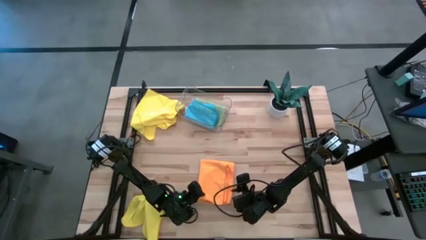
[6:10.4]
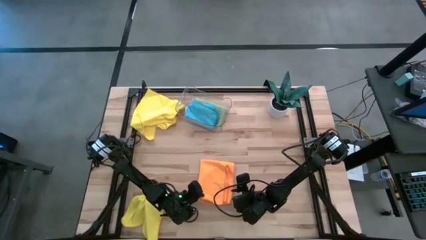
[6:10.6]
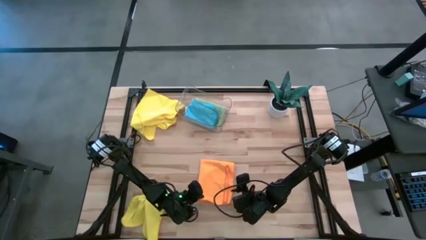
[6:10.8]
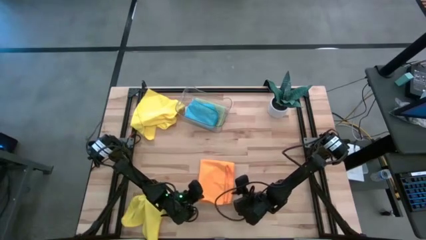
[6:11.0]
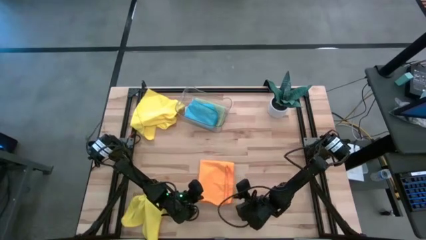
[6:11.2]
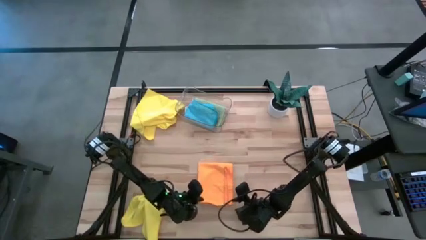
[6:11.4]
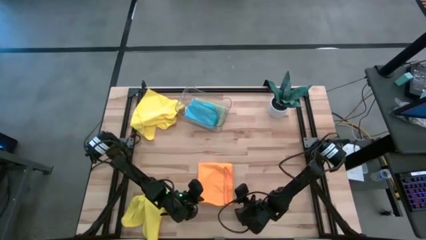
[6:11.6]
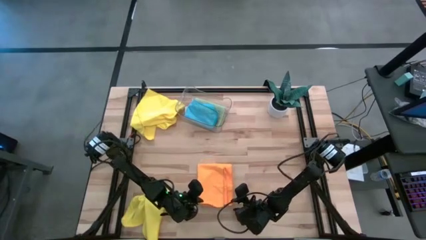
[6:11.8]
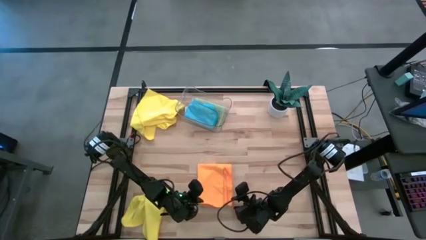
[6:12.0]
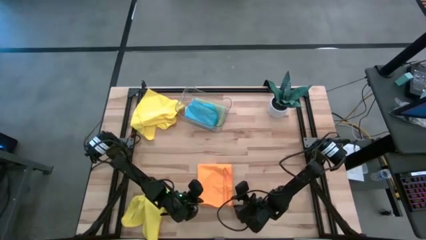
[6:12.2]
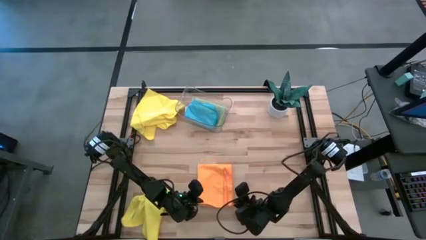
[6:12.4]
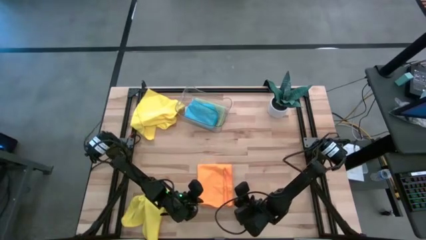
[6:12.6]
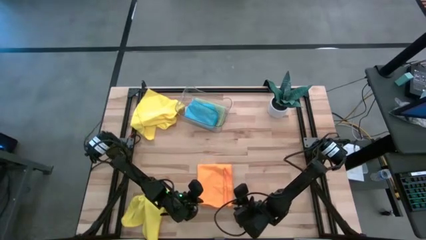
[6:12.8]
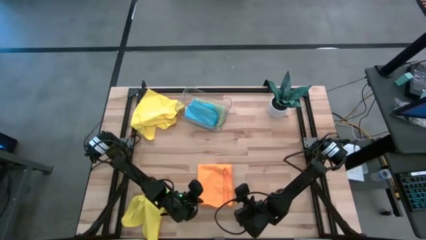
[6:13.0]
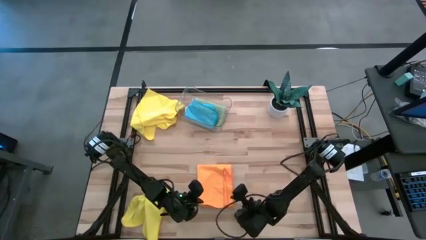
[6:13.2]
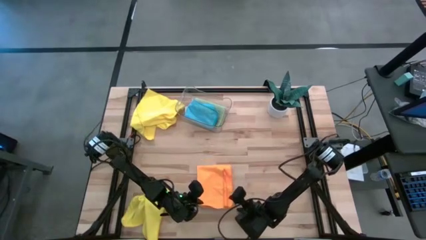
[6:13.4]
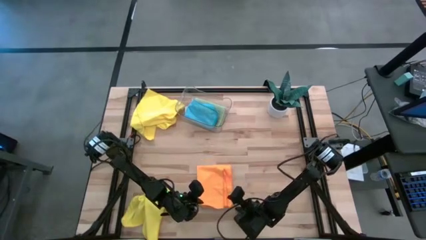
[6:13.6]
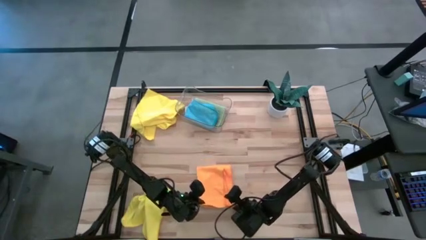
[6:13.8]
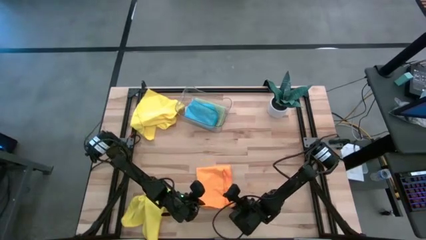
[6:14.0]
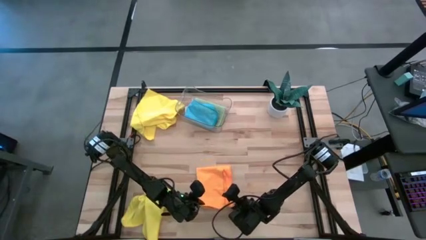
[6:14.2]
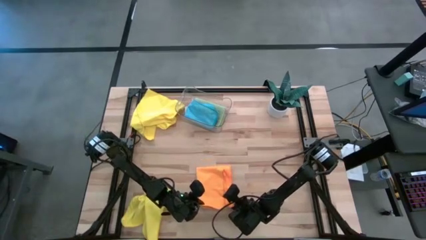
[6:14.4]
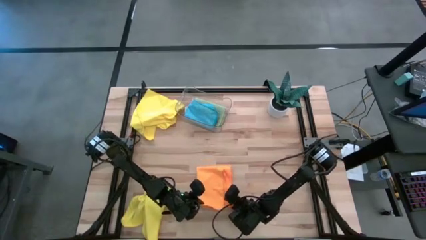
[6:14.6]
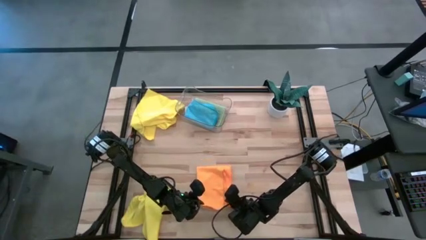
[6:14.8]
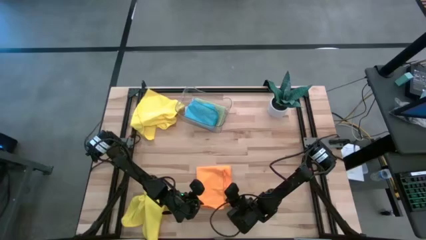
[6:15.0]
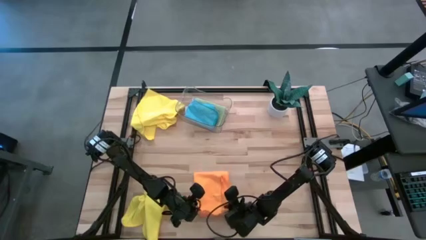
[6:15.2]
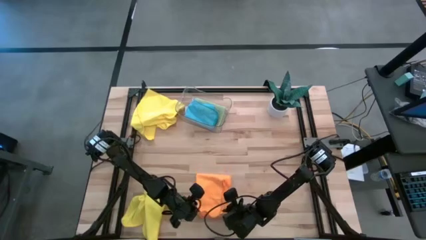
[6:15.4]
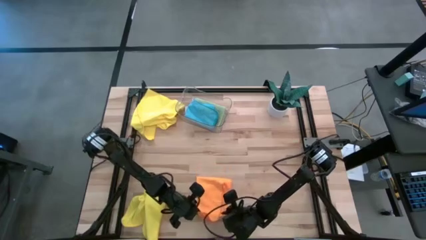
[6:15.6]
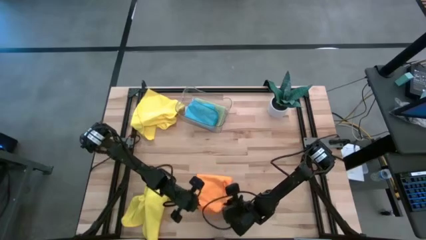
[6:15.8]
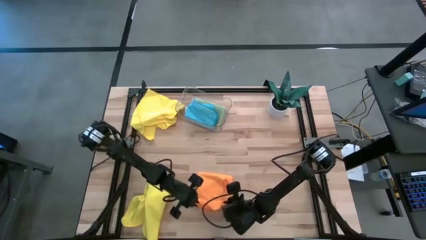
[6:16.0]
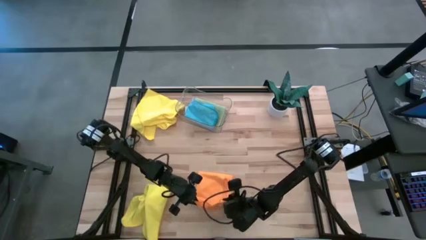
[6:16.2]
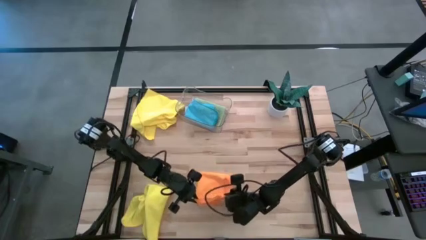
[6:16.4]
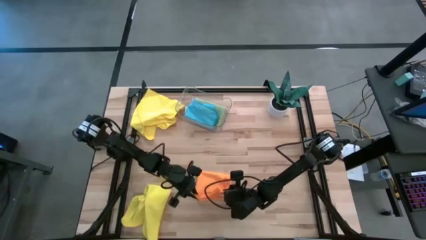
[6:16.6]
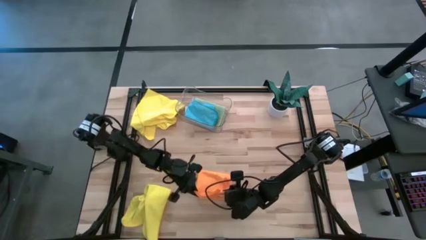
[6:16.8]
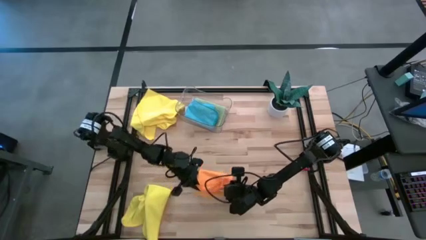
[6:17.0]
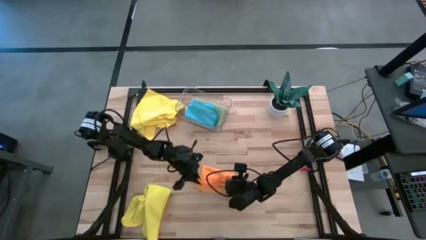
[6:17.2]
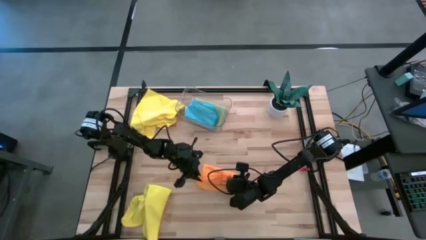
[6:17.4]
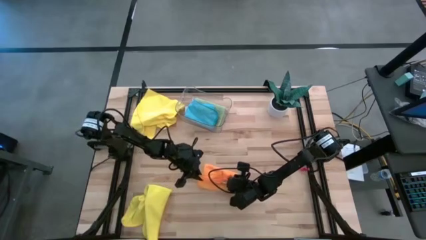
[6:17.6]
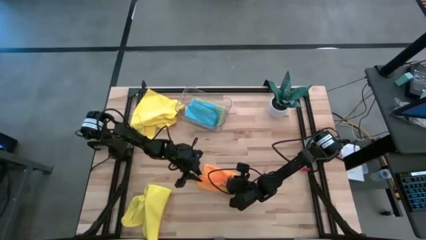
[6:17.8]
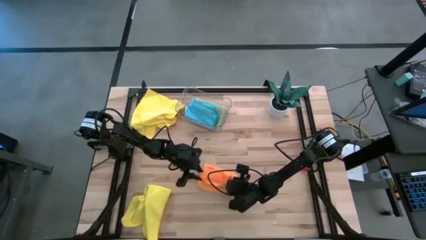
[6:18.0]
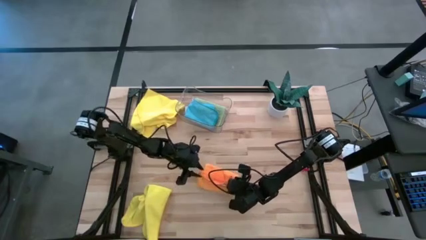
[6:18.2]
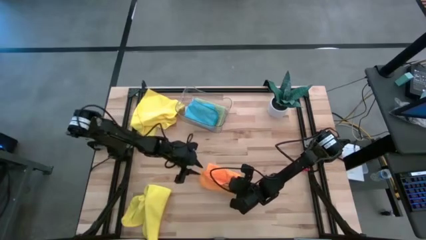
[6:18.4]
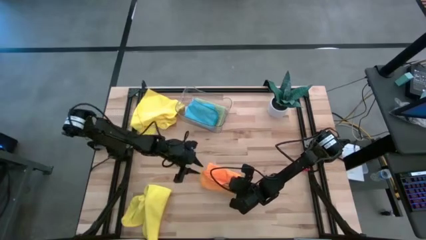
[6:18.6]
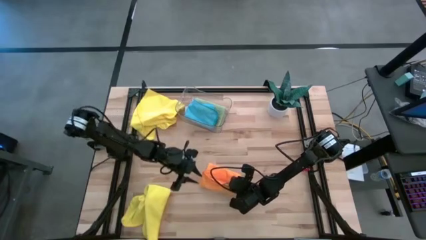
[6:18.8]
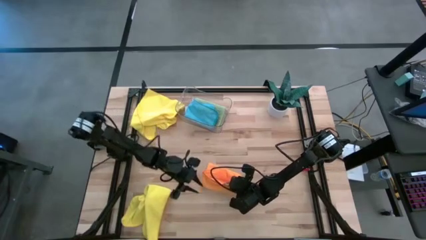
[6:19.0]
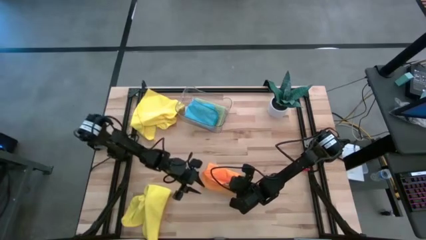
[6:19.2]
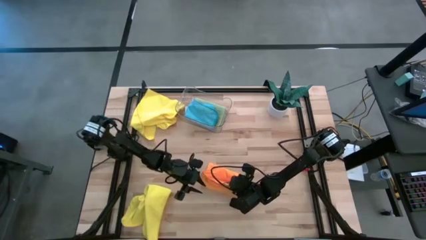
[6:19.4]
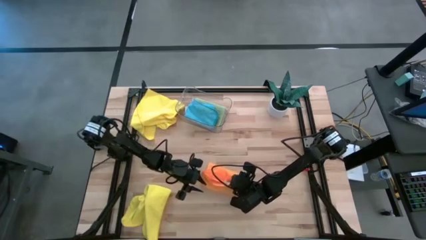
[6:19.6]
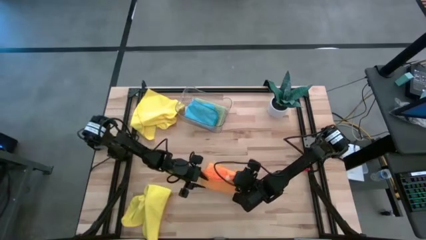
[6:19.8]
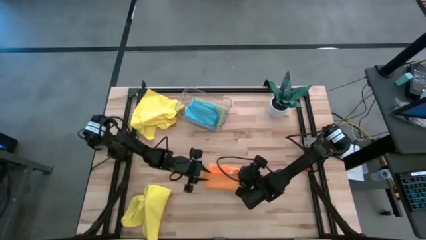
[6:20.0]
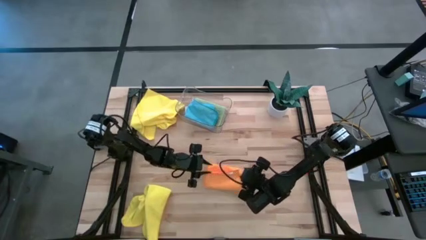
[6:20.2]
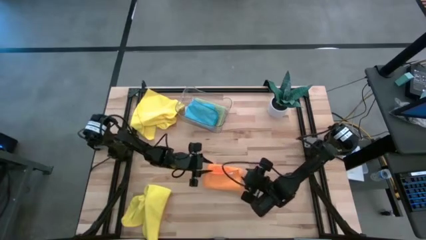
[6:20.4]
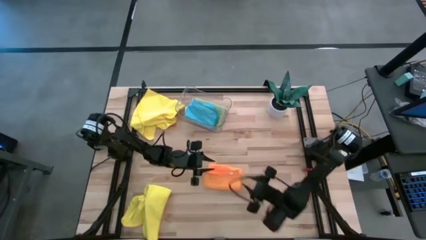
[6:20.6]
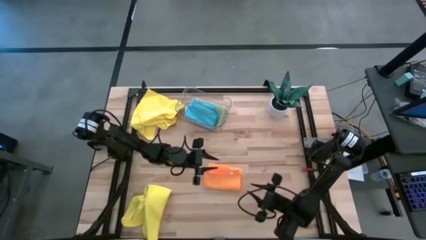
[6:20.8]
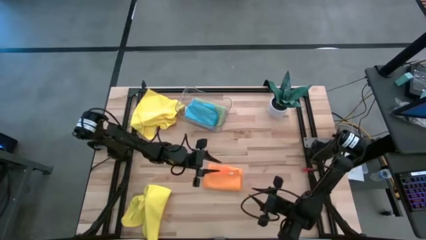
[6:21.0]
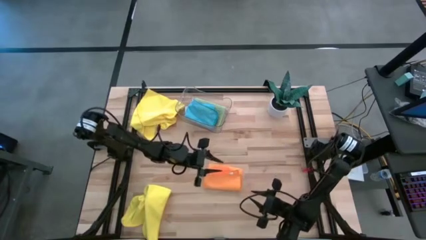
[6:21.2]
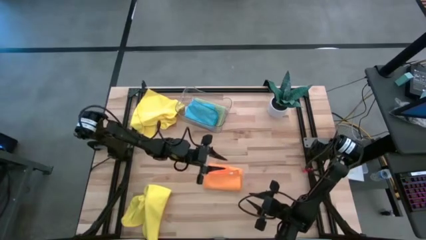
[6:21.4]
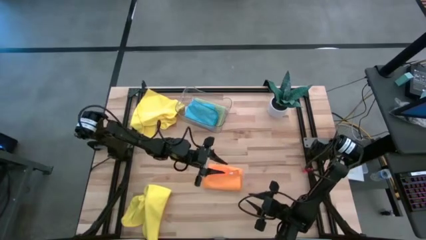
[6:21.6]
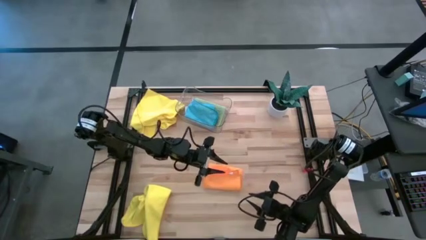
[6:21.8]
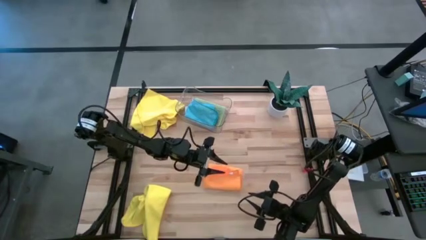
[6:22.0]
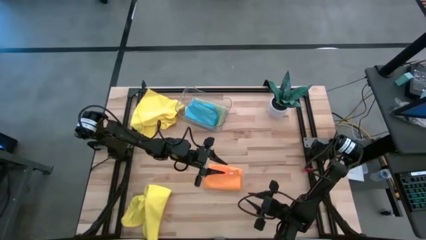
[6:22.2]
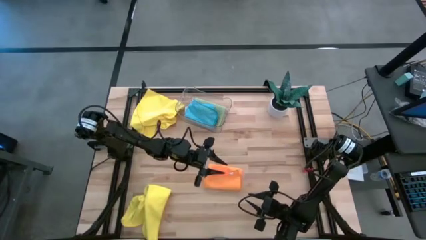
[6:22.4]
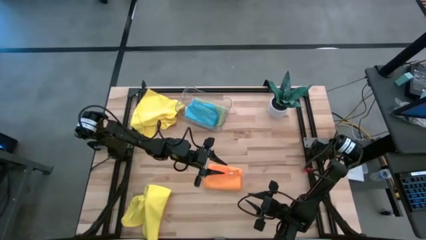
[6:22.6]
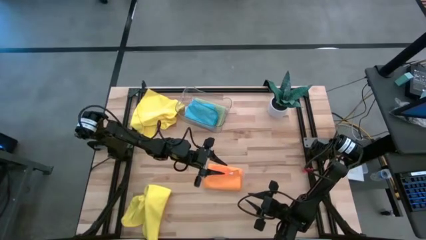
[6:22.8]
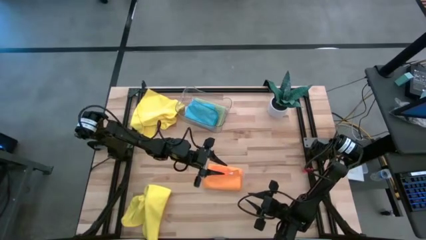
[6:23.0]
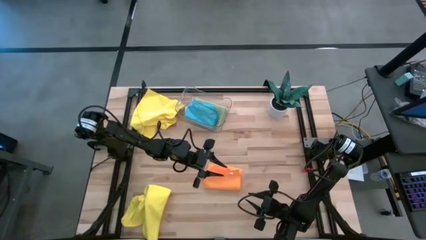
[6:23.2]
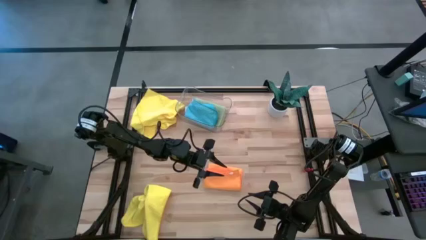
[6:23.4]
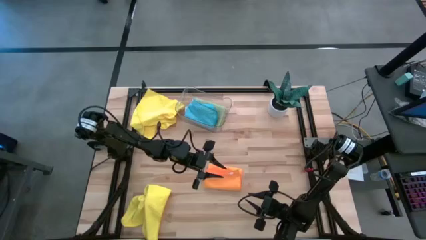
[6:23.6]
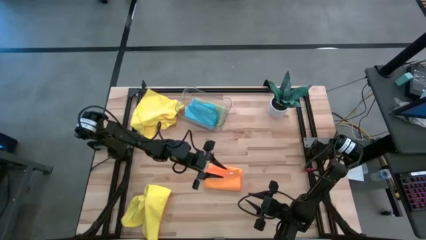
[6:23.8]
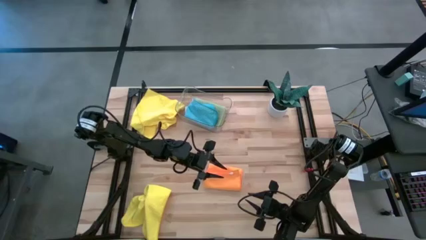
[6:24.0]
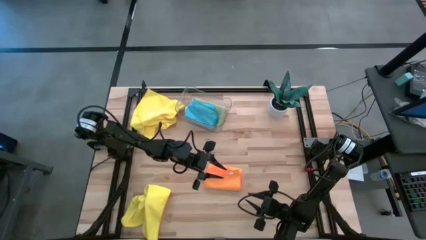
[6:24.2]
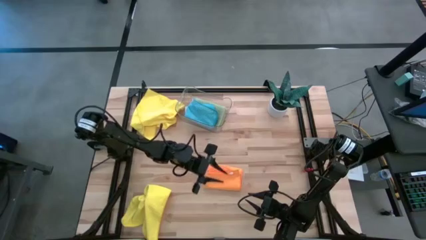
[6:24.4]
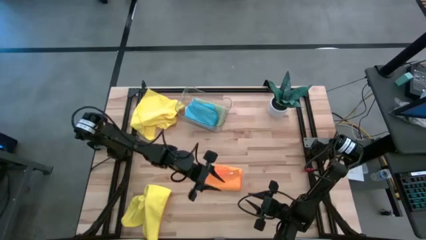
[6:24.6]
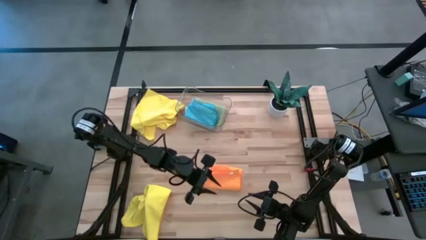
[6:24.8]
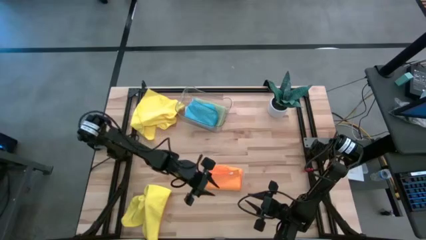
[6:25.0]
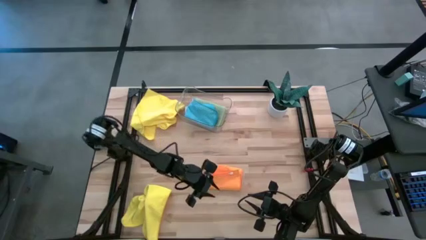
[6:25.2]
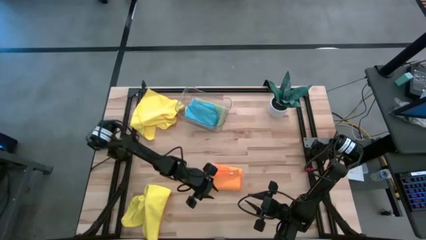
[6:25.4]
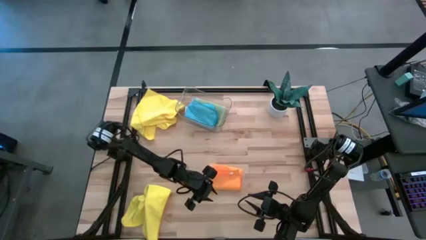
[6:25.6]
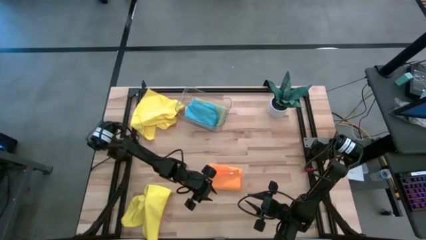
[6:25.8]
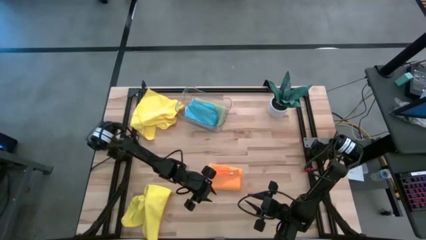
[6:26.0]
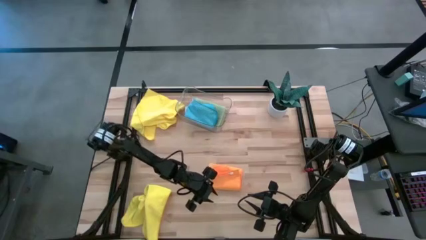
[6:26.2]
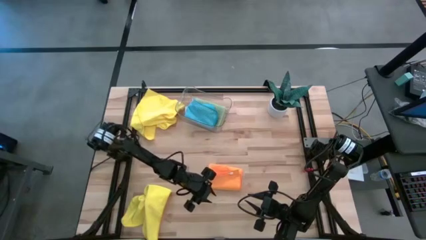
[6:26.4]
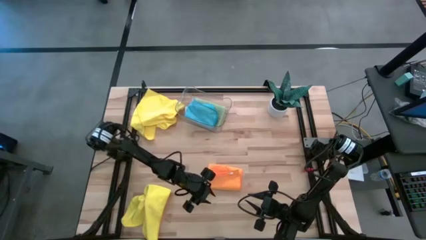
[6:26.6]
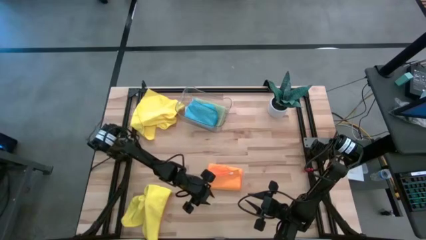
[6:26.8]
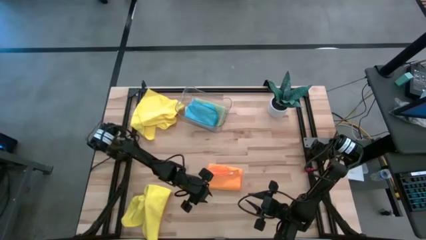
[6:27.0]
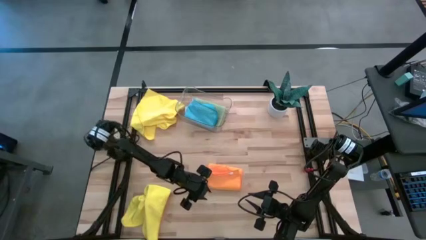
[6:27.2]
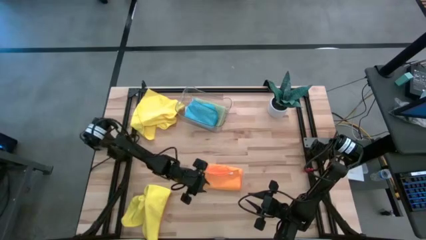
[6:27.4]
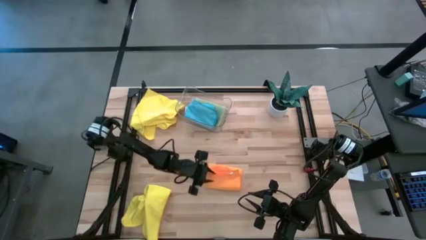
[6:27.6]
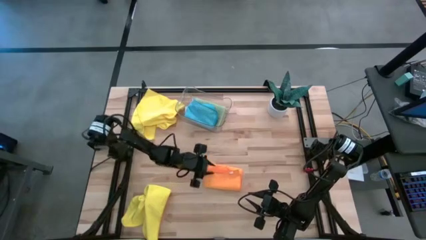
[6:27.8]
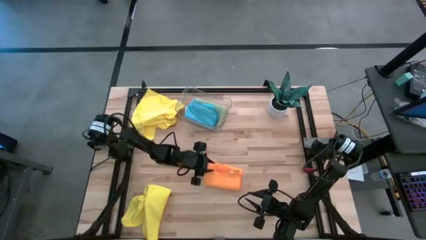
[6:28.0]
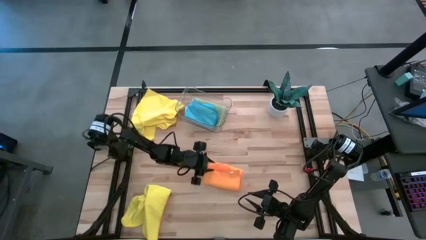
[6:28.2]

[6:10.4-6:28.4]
Task: Fold microfiber towels
Fold the orange towel
